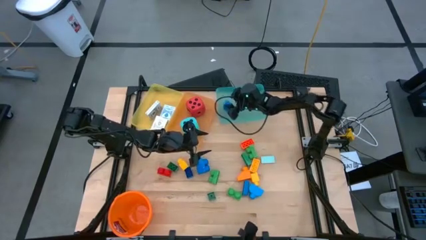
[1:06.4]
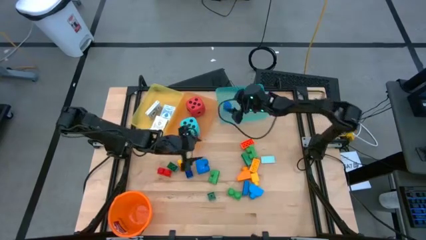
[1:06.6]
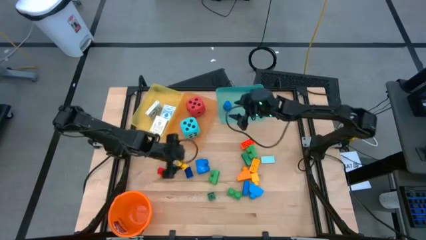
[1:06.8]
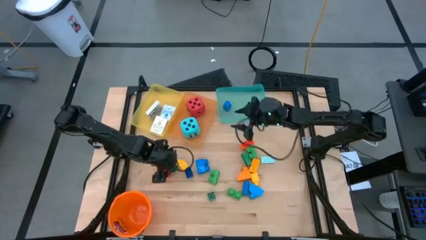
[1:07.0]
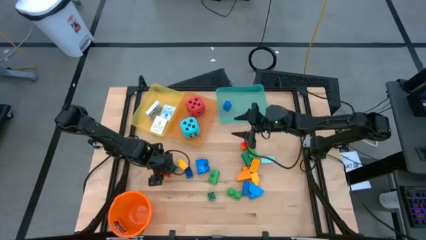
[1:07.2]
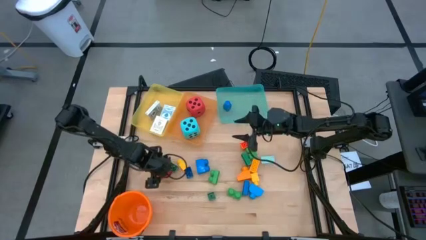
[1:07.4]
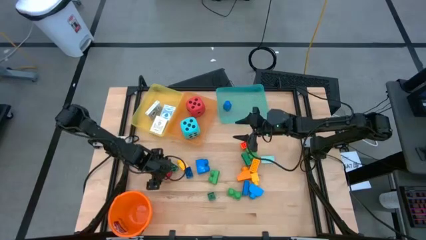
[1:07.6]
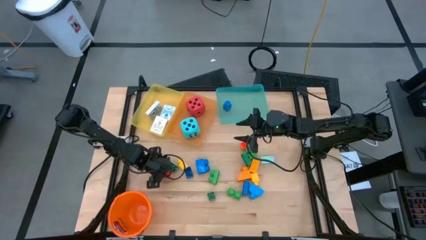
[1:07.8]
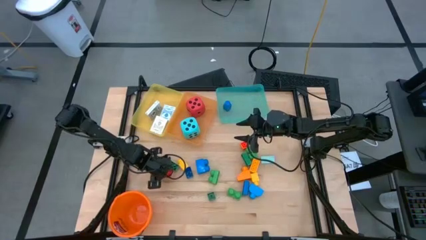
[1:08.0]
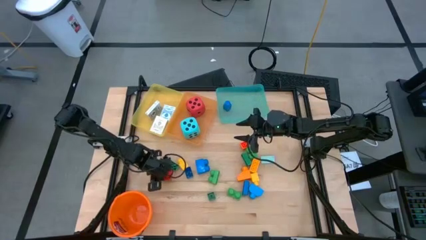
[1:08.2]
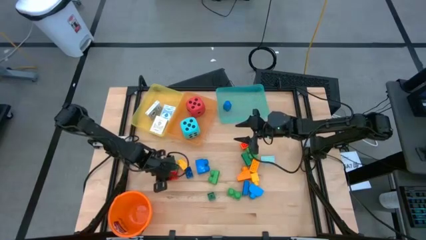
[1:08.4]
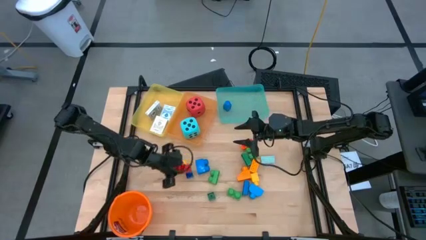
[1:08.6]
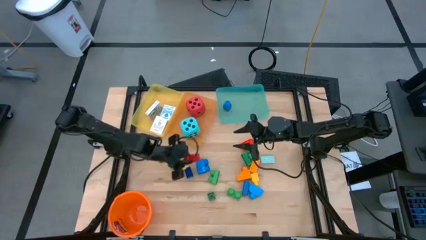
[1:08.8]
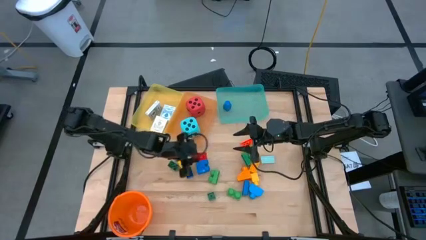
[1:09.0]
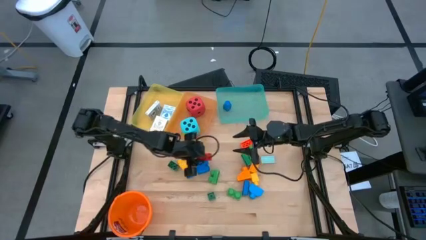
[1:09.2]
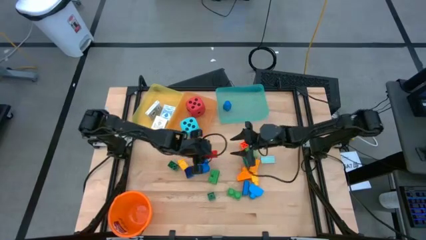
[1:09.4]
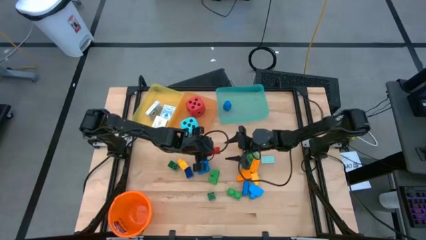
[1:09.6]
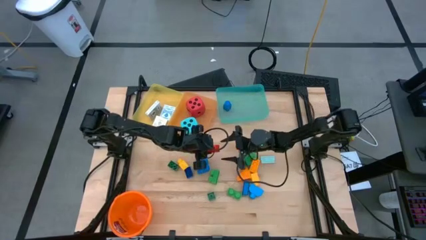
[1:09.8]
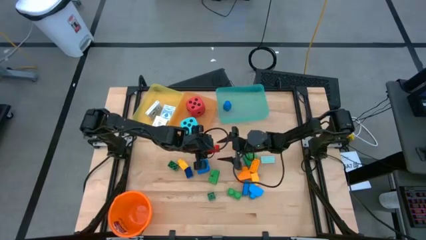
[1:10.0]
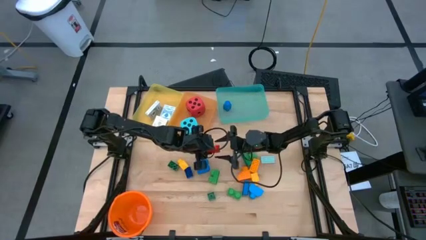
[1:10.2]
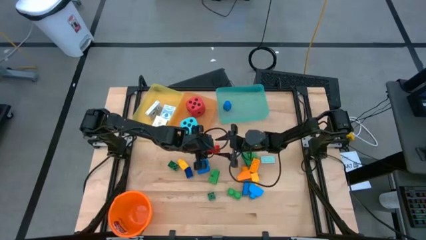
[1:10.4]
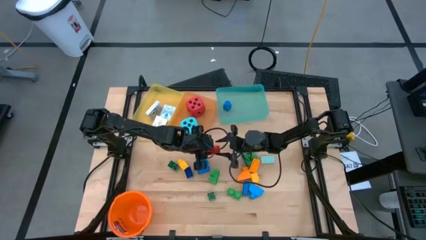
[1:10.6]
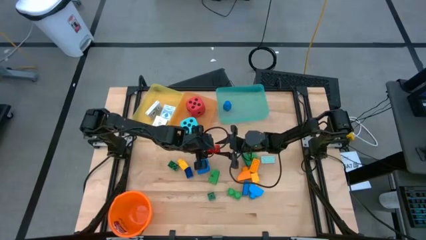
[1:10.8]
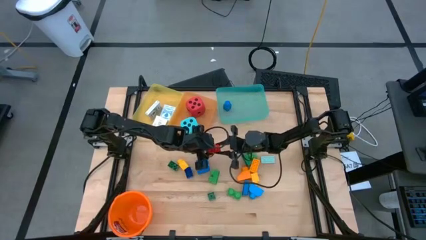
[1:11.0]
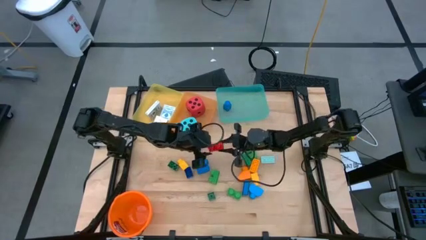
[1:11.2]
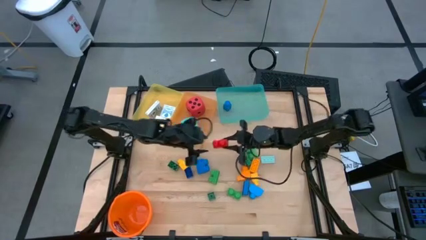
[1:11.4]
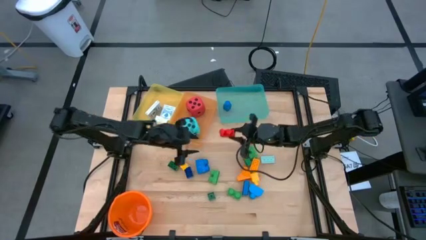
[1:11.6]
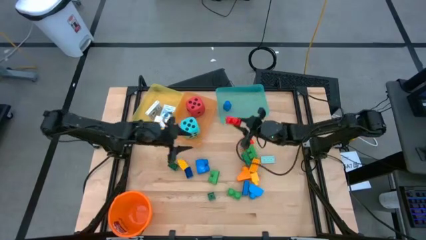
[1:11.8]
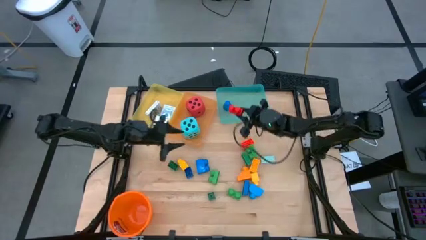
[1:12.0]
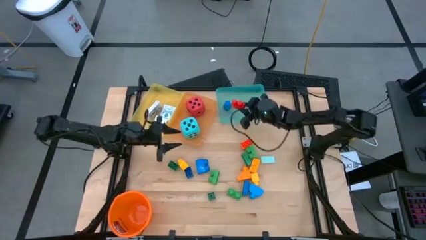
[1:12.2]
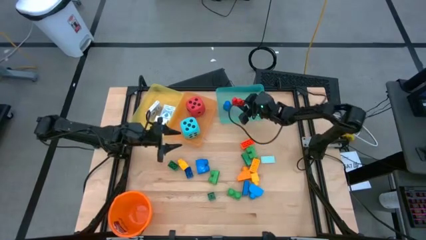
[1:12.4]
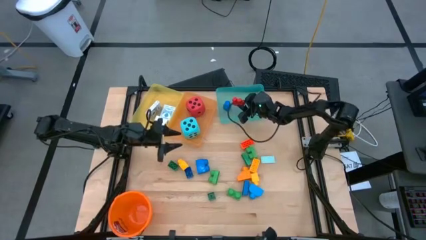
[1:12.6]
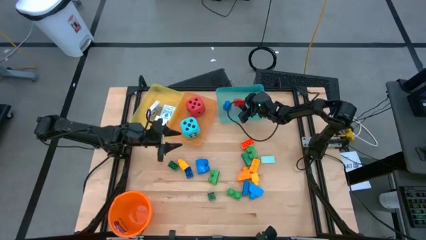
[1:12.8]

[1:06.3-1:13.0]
Task: Pick & Place Toys
Put the red game piece into the blue bin

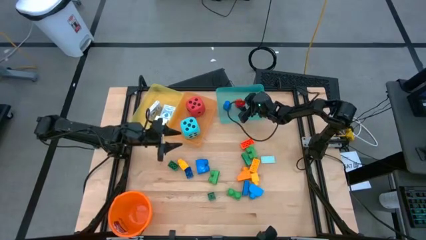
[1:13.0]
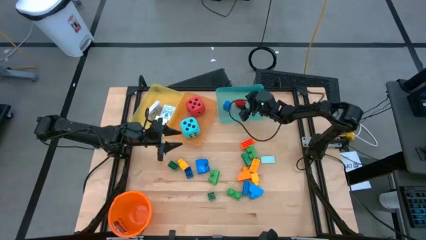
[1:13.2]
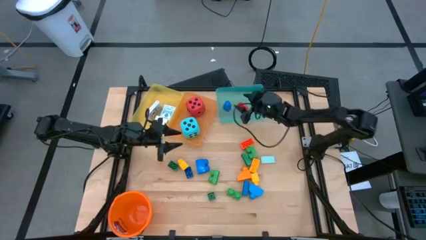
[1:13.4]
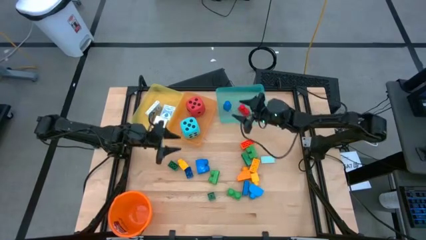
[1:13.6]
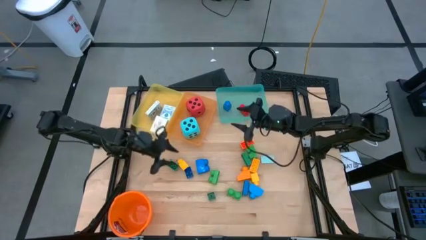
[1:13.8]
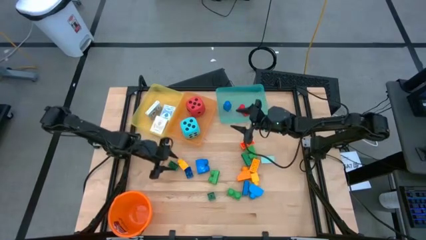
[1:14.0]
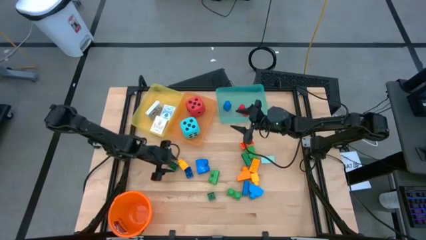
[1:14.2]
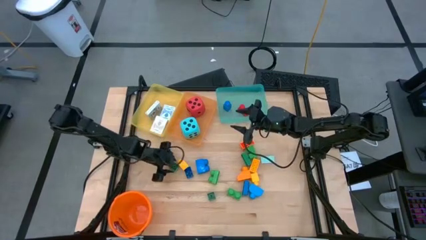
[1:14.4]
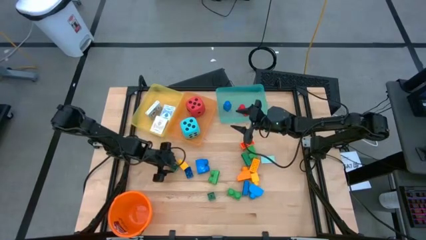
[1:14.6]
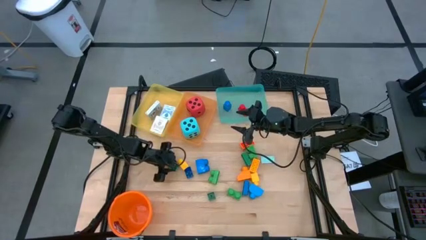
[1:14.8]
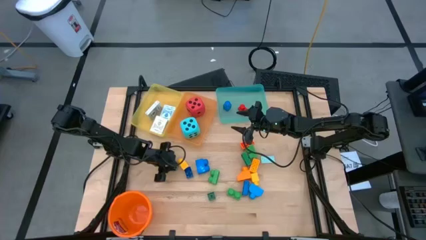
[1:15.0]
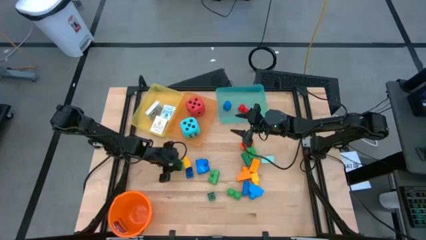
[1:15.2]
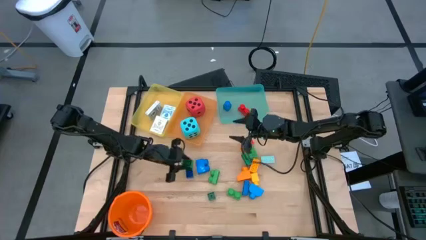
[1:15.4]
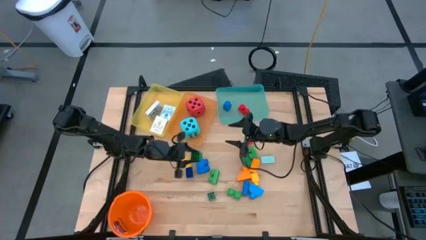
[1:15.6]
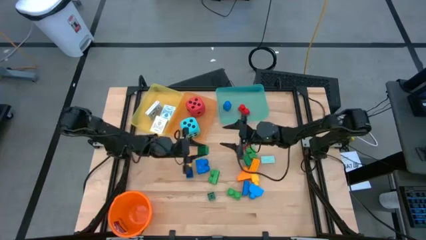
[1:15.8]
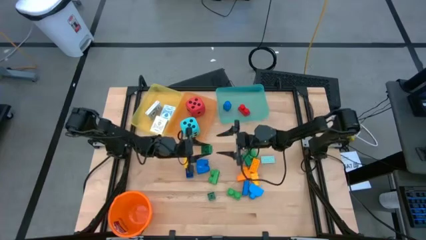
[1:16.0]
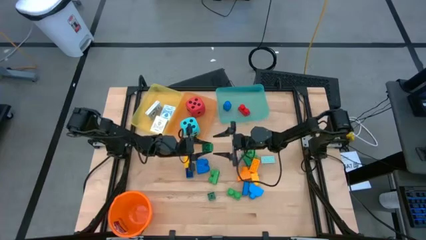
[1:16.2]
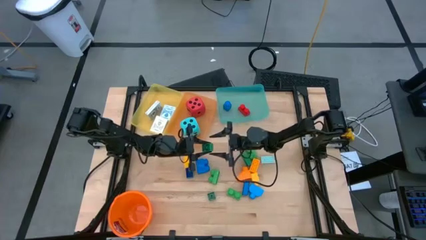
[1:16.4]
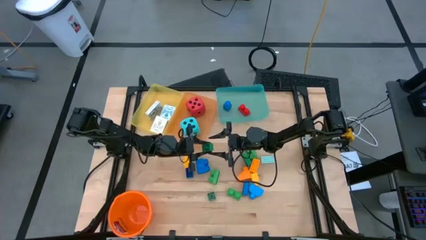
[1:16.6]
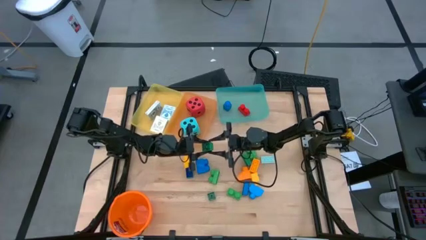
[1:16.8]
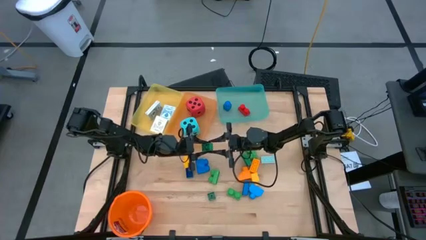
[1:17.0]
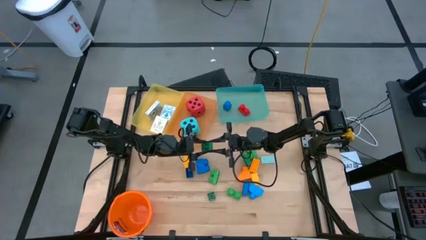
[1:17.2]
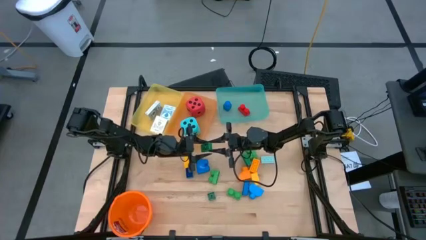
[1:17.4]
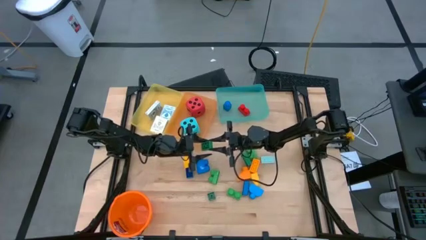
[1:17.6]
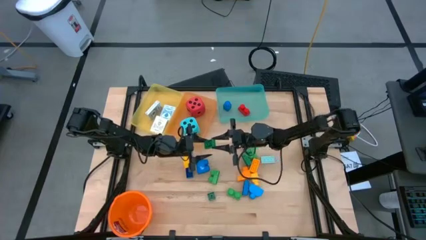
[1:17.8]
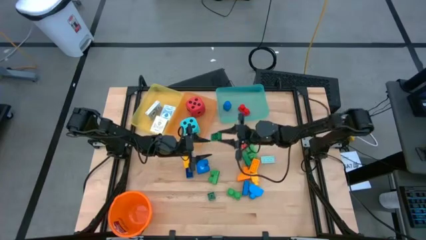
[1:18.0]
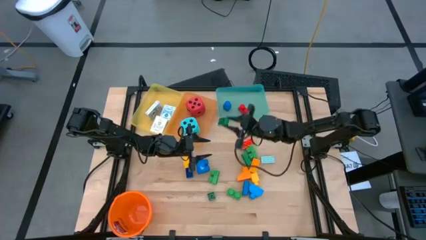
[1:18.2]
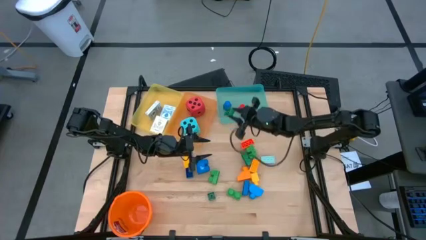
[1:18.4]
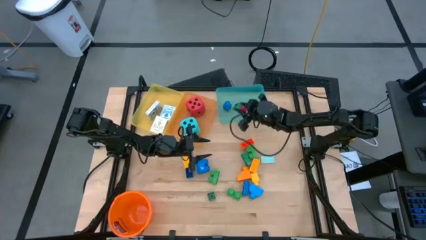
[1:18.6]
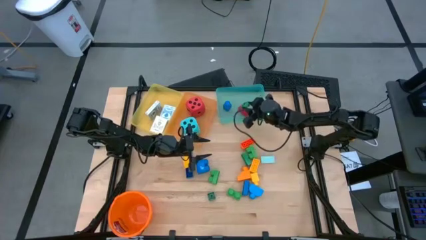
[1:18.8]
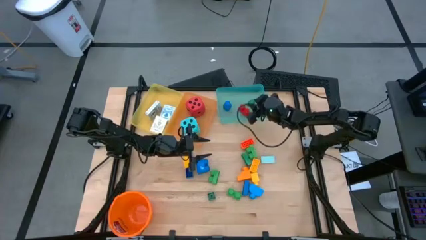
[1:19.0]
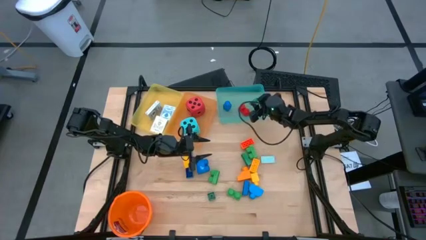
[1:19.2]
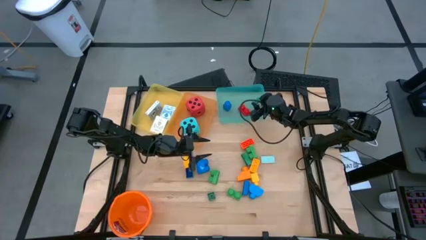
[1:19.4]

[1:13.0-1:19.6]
Put the green game piece into the blue bin

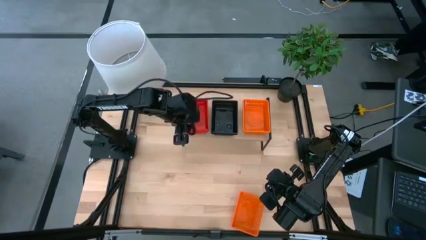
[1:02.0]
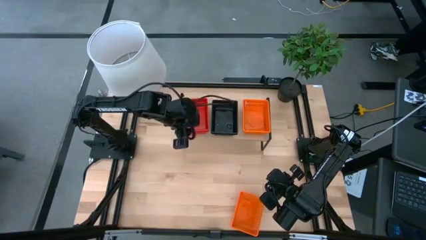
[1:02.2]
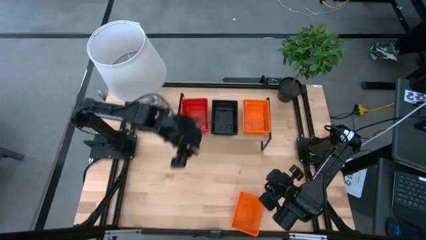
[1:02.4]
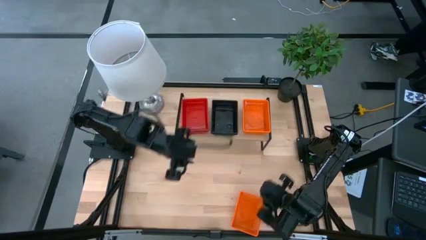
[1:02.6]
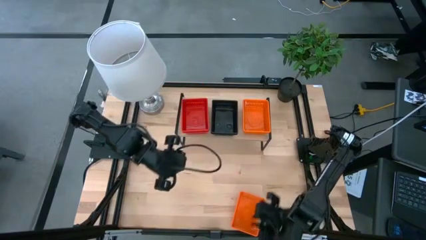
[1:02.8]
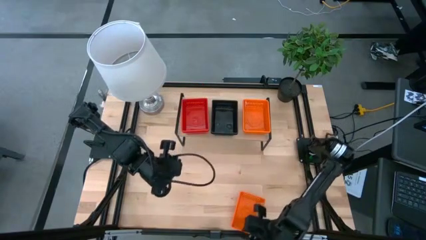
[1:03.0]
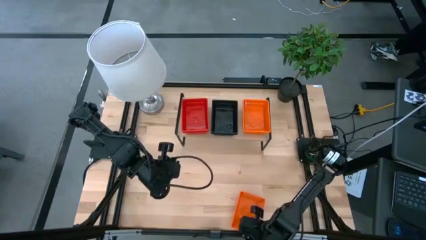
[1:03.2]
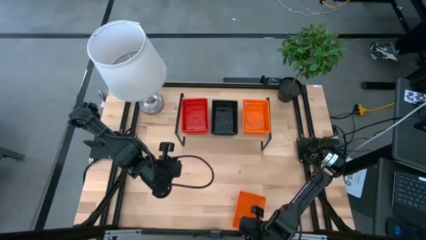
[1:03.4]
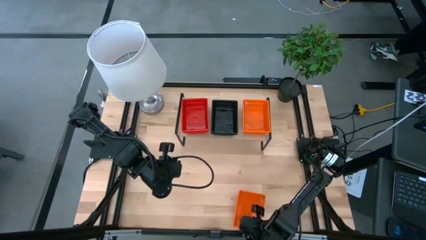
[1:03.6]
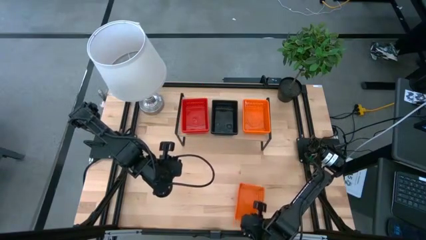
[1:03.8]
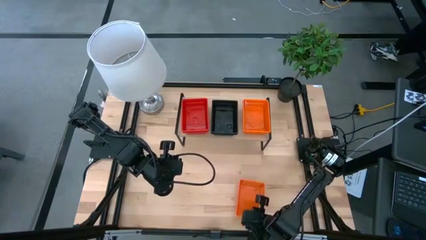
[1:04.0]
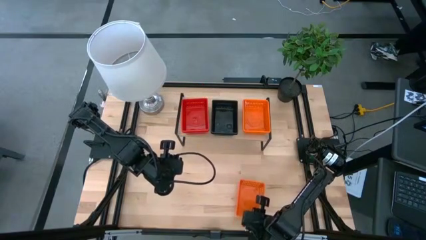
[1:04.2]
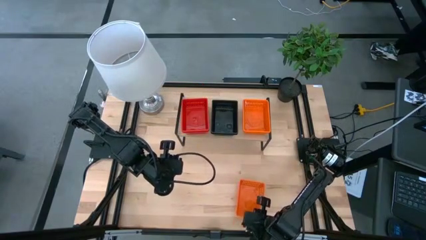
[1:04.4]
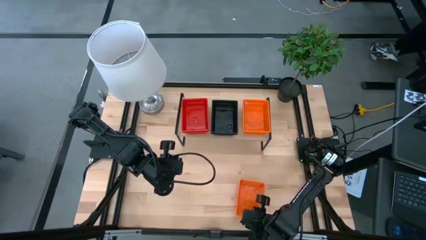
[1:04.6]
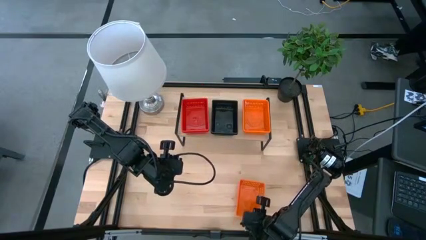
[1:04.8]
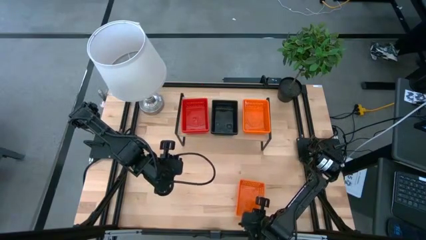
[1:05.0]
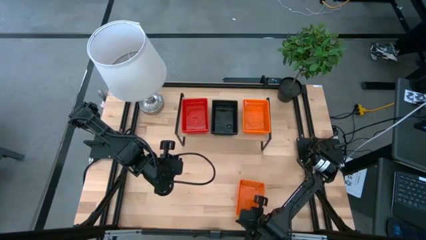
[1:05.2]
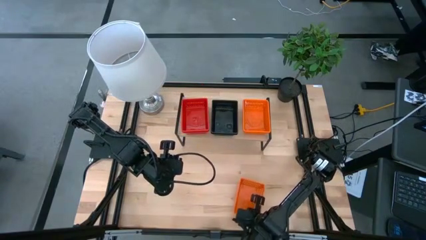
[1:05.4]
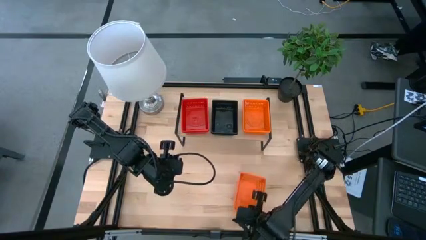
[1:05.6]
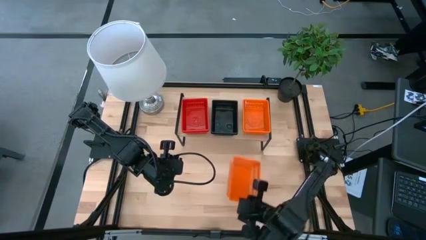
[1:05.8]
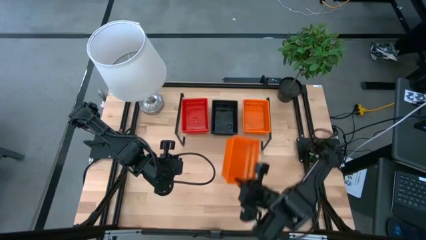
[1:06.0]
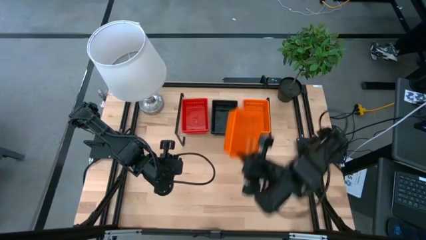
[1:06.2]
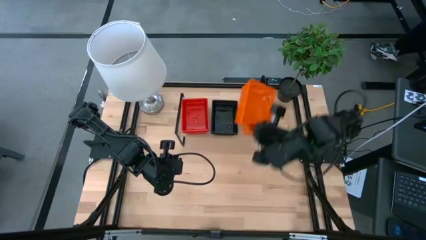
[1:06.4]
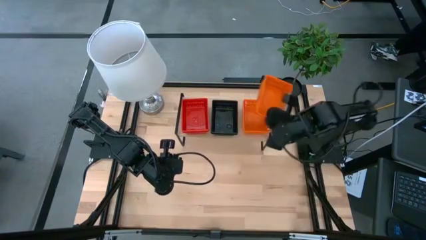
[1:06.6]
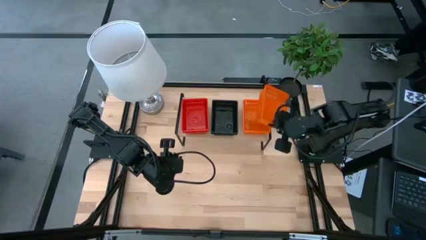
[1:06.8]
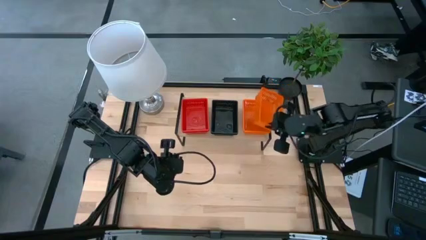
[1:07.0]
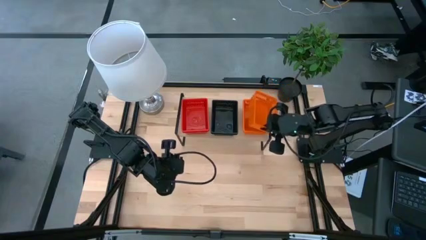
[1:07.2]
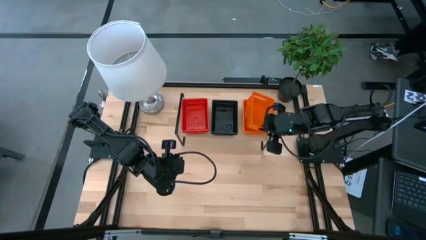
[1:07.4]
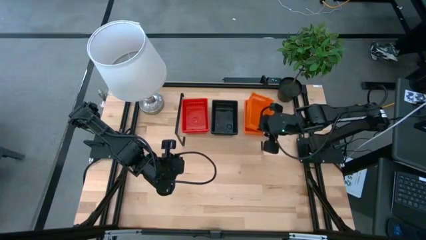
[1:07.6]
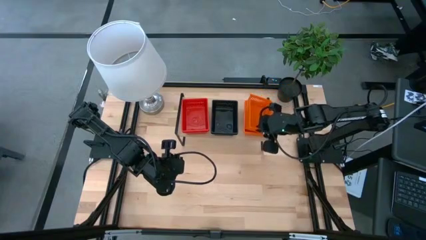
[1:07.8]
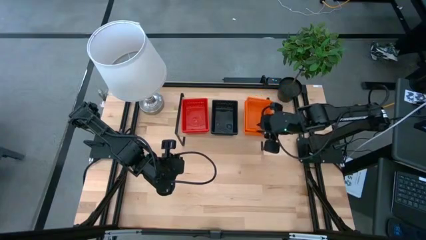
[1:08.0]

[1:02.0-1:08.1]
Task: Stack baskets on shelf by color
Stack the orange bin on top of the orange bin
